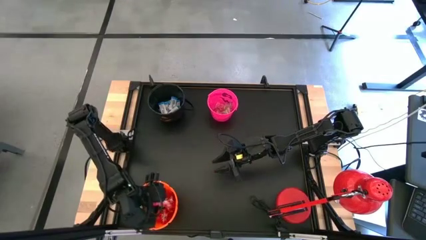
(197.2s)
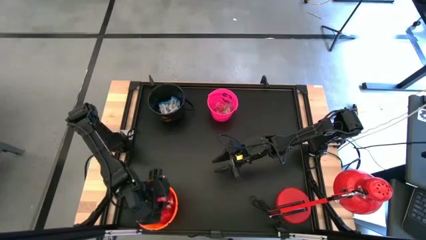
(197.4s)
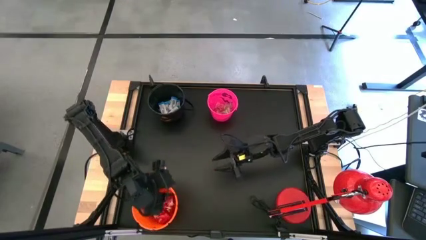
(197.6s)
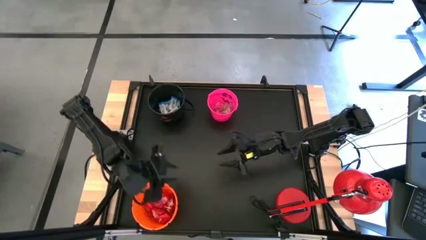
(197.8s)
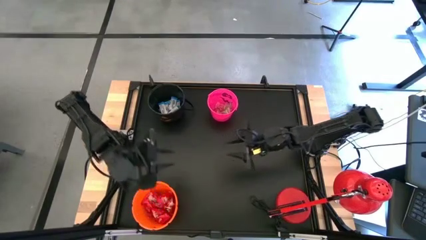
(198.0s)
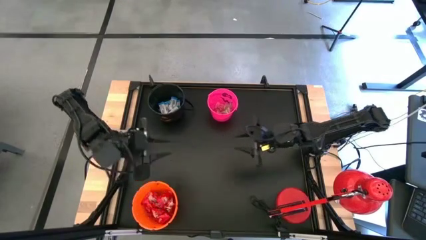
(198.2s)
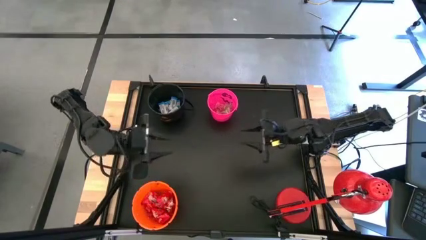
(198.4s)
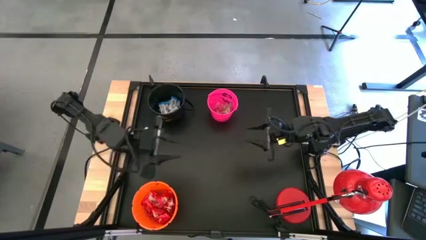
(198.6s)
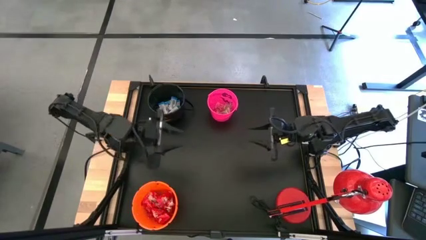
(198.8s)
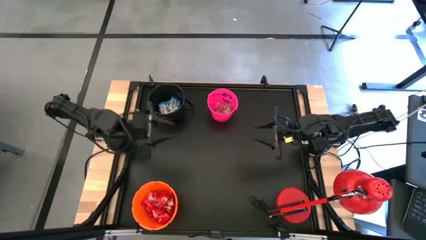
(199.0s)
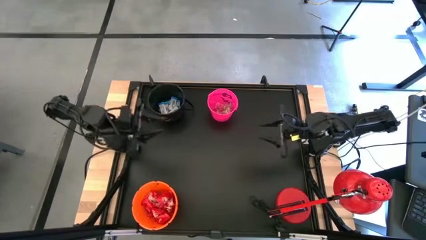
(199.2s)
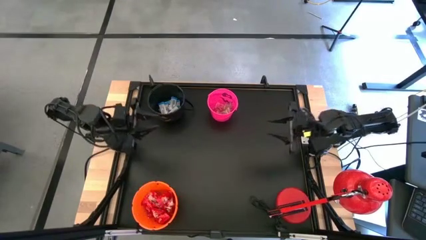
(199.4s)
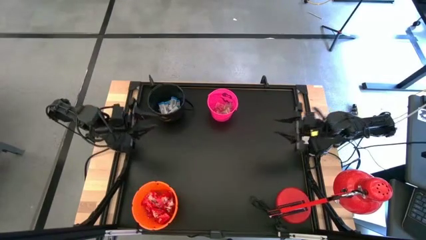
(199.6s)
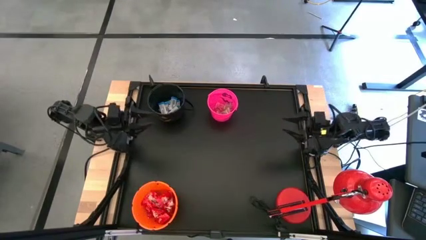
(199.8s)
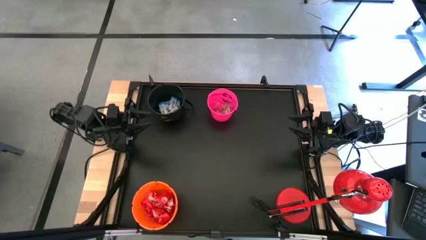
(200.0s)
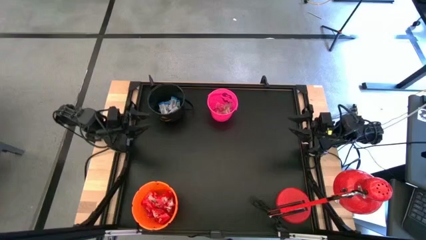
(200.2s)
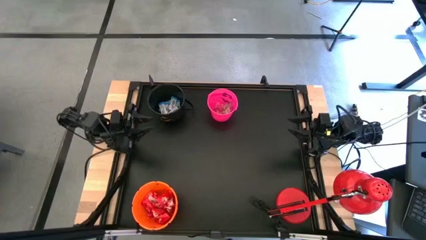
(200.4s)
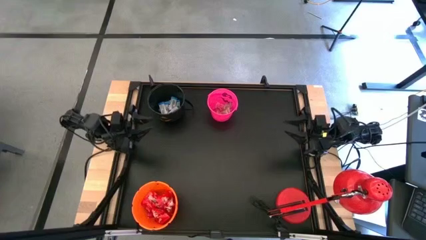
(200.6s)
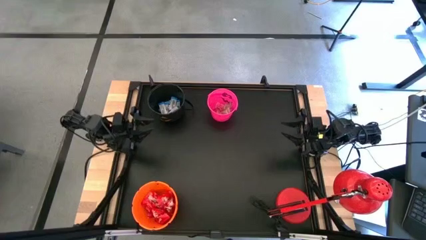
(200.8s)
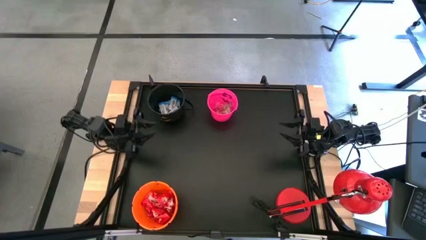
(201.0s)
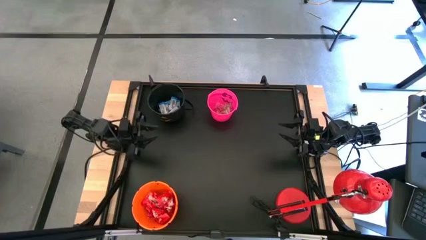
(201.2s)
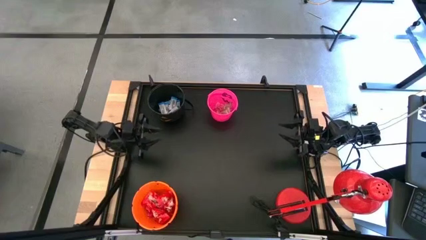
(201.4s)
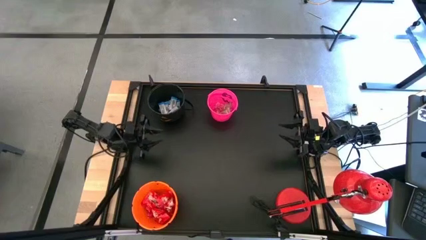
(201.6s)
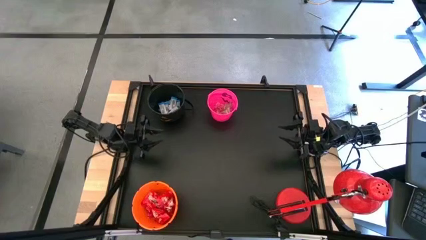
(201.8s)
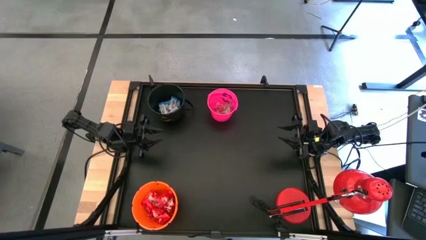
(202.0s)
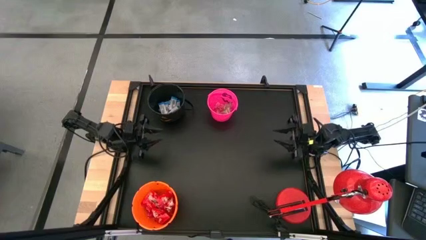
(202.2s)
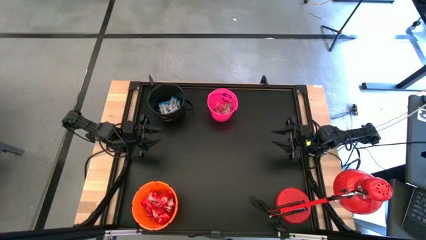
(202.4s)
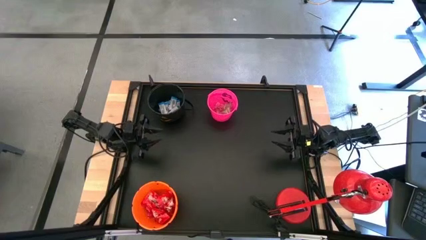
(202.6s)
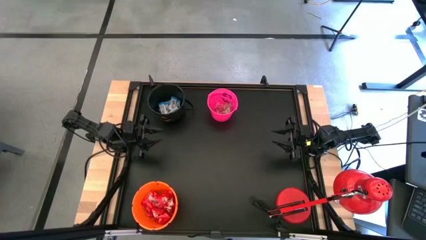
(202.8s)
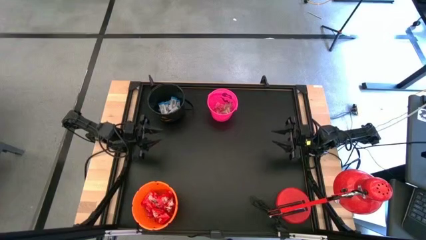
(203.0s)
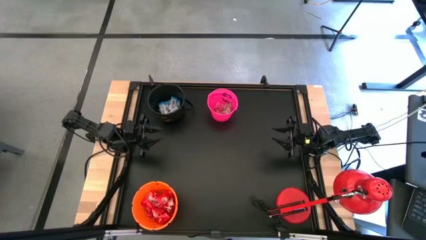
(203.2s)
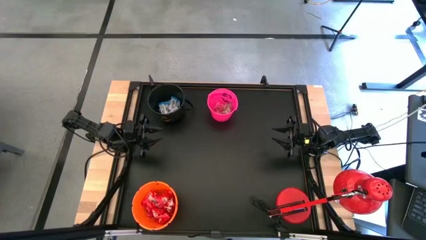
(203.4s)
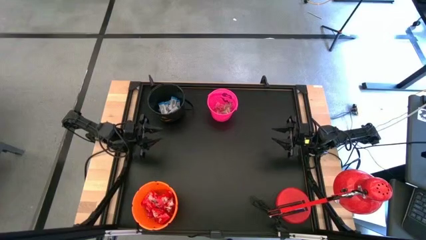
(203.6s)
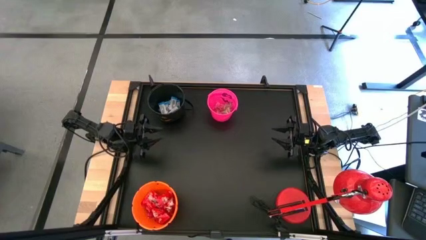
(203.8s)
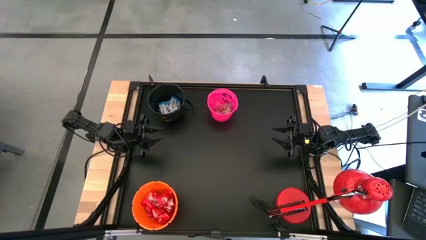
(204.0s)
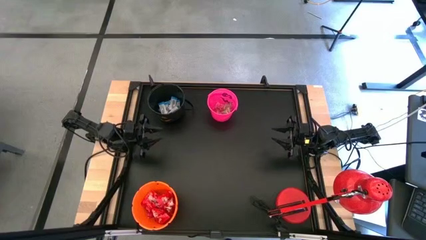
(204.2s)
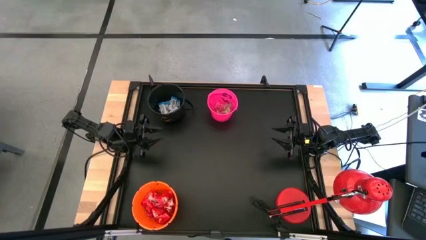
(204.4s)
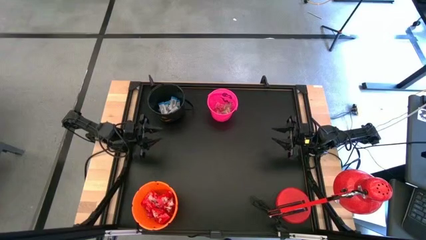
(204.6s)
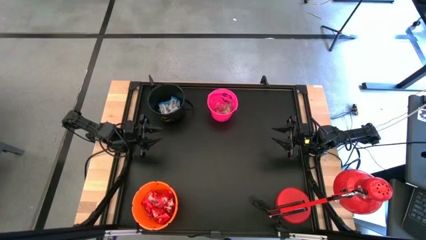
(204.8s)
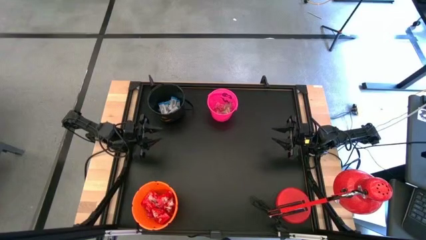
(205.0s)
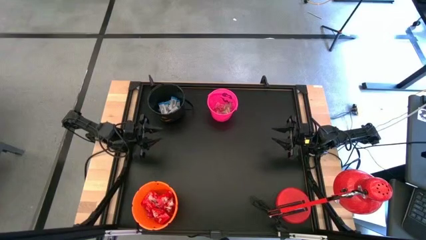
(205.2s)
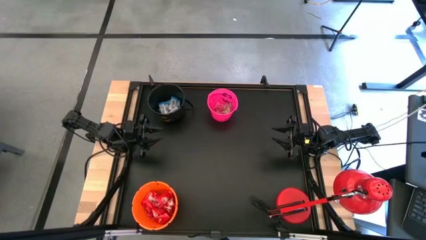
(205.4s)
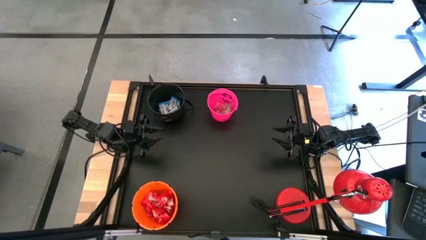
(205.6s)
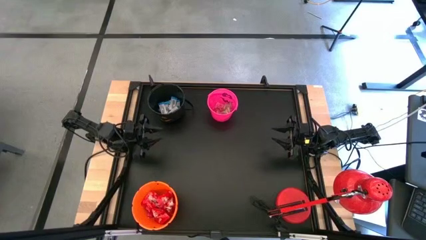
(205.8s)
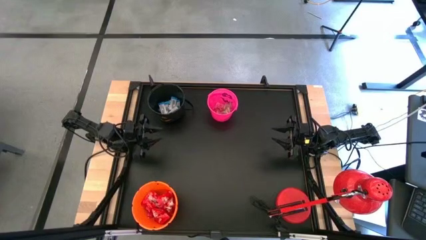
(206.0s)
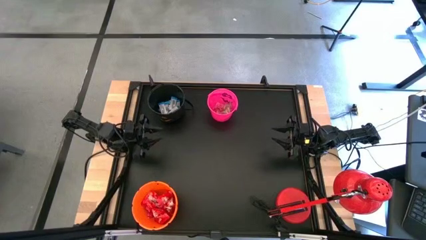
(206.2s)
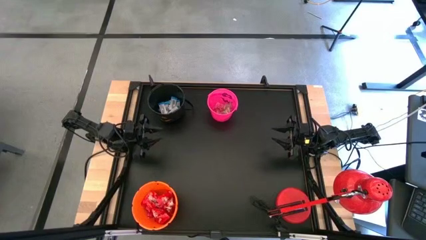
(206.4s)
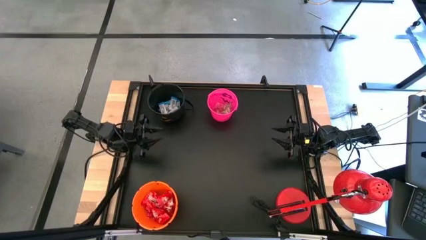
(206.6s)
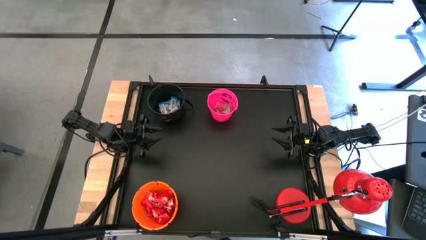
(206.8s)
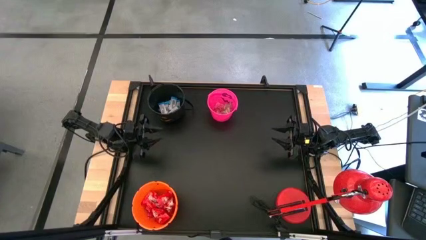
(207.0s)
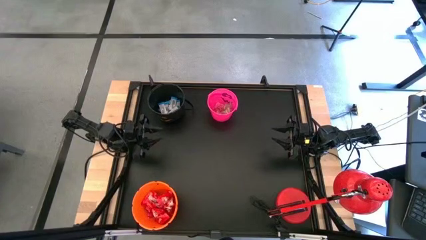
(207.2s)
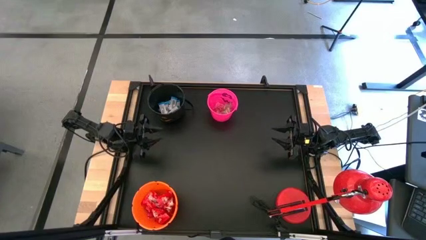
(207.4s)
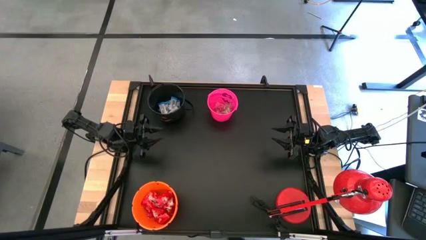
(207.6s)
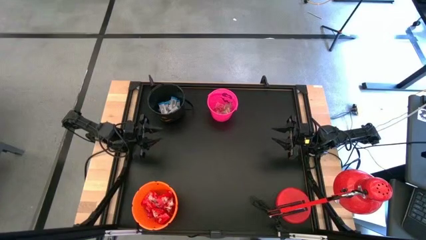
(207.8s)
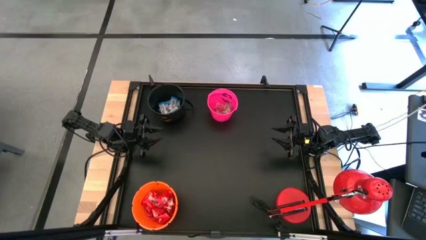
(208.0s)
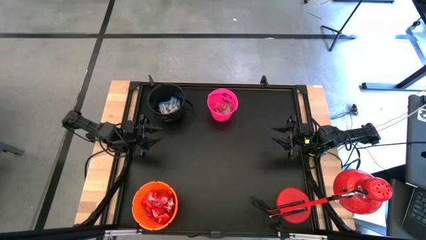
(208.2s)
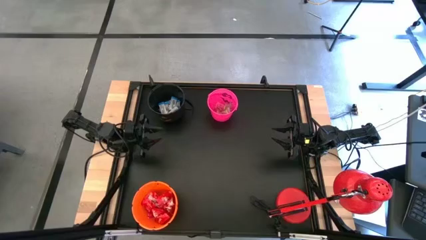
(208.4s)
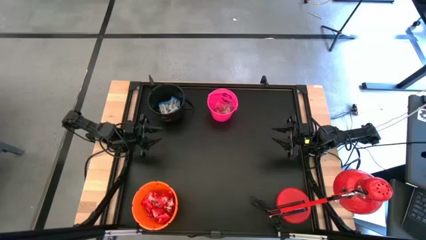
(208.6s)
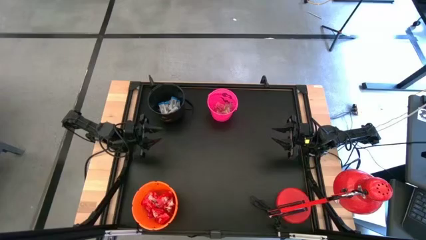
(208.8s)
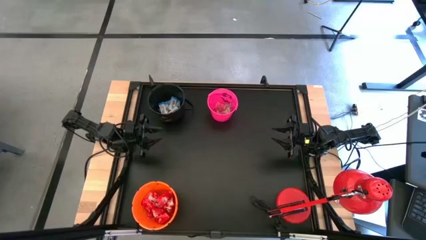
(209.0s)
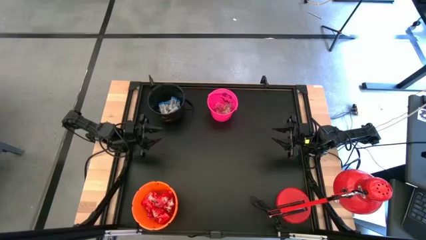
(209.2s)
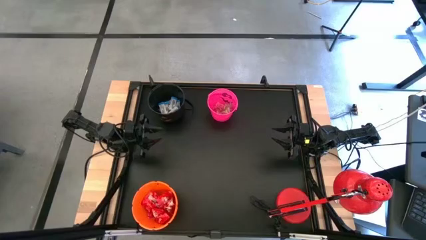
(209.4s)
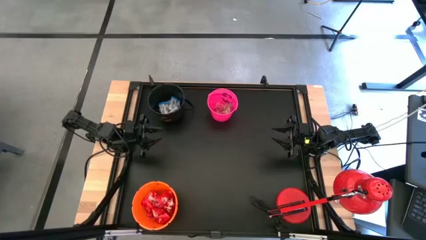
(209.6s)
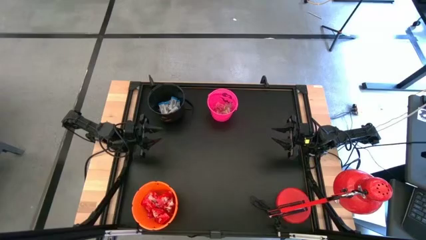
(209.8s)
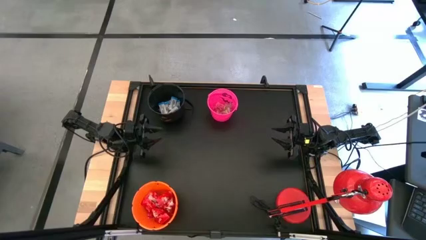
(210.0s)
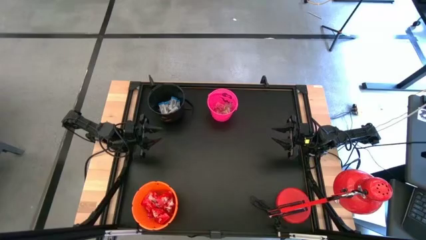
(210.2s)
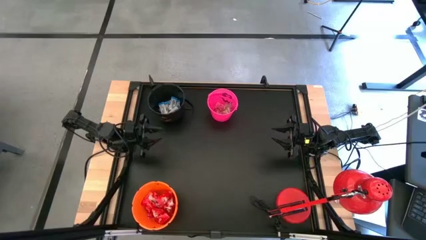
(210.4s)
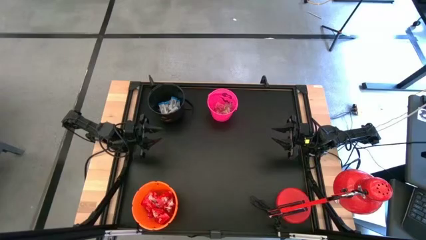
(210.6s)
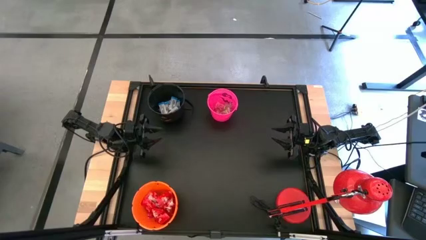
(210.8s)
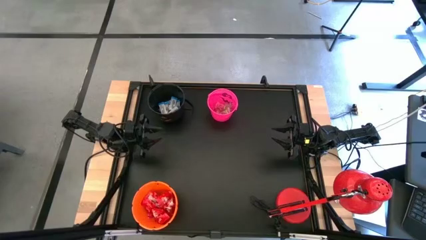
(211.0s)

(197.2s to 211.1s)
Task: Organize candy in baskets
Return to Home Position
